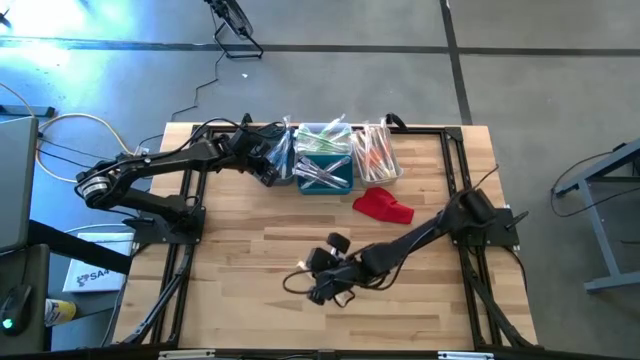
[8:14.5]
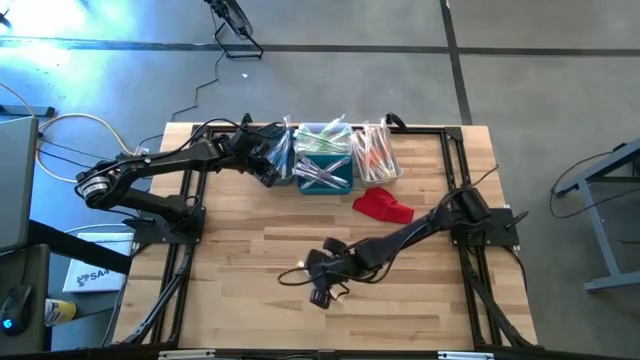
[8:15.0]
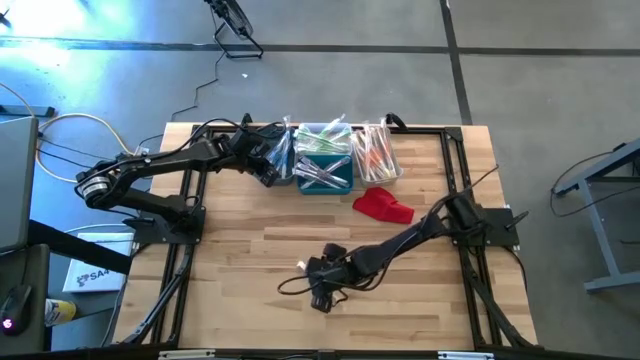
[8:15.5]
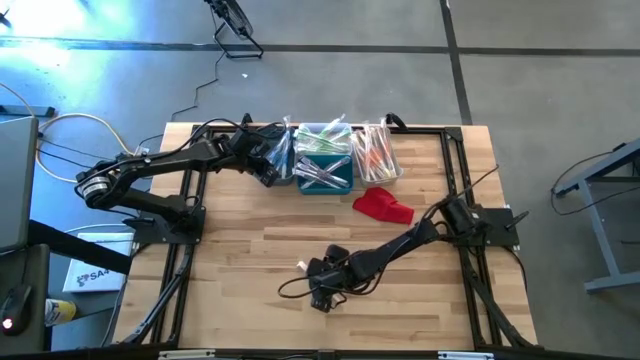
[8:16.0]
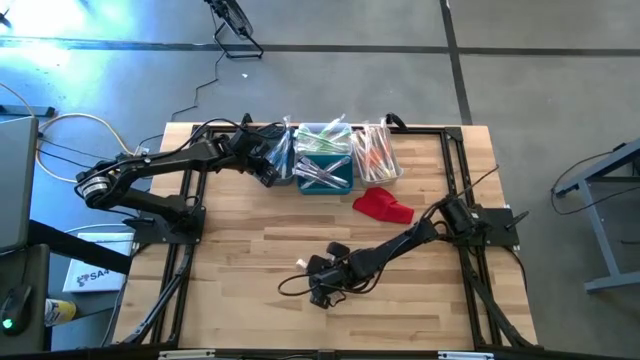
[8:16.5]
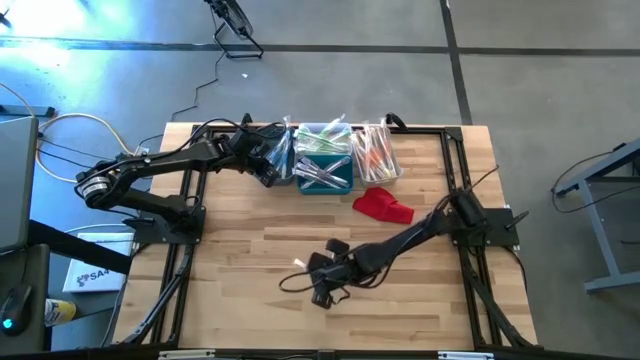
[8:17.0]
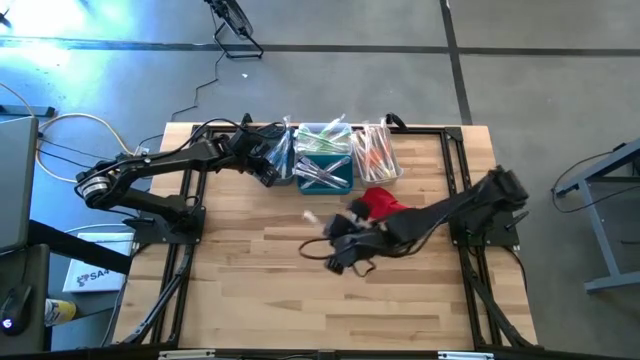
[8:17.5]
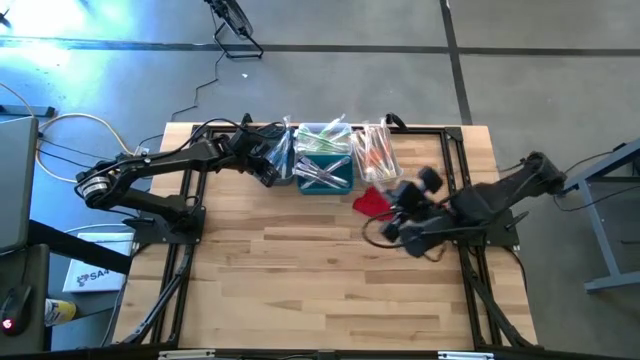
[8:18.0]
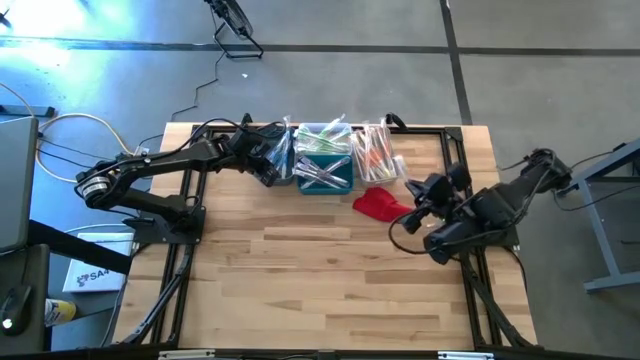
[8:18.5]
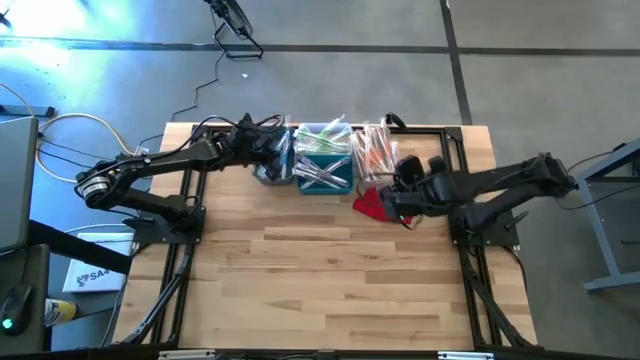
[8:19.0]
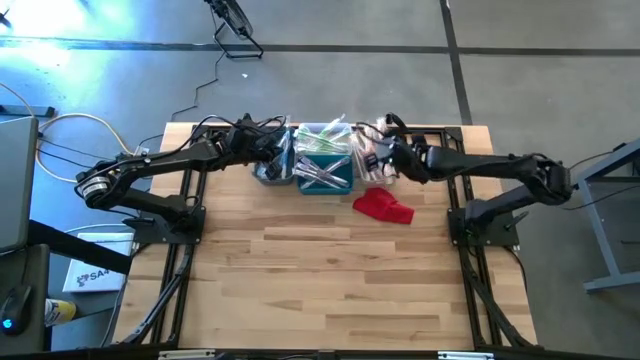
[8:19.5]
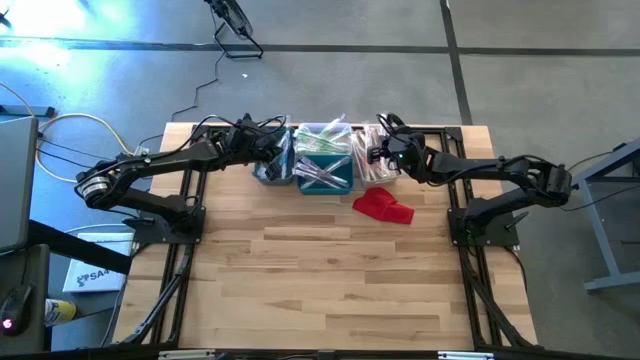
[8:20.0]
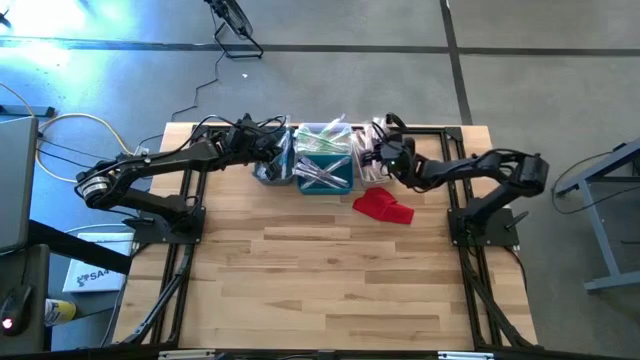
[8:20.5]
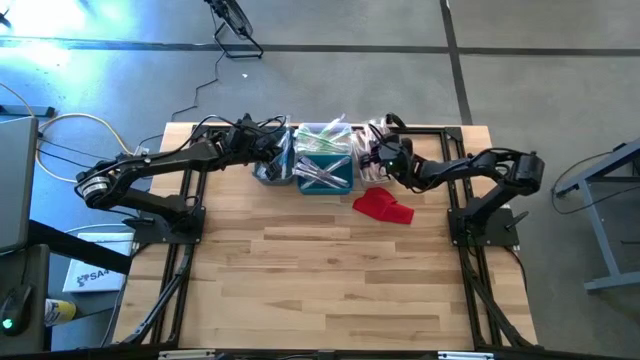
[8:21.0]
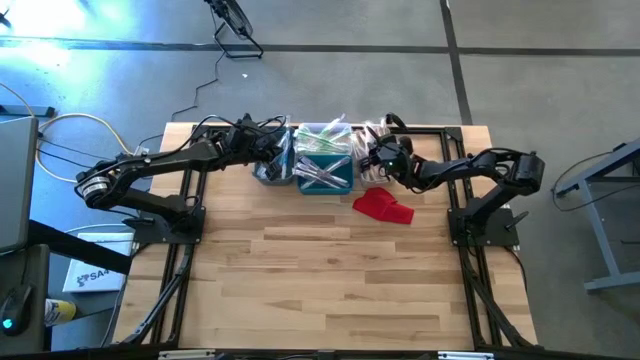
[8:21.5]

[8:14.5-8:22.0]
Task: Pick & Place Toothbrushes
Put the orange toothbrush into the white bin

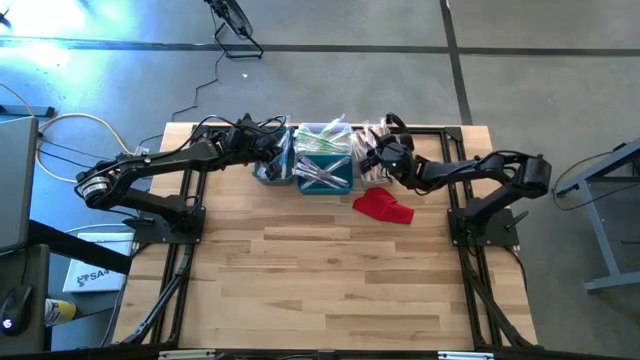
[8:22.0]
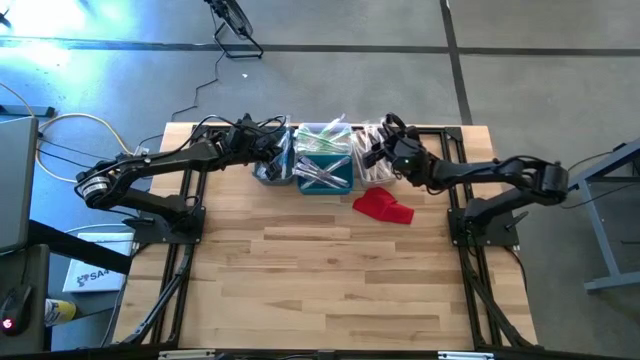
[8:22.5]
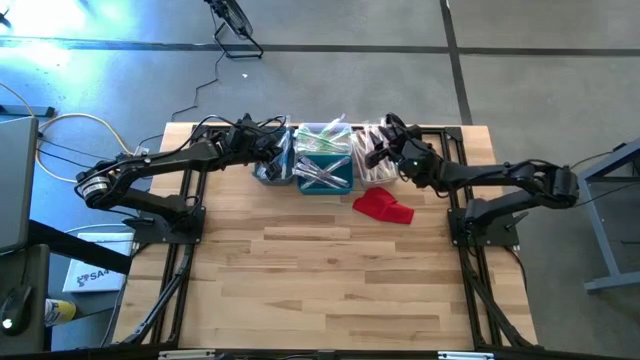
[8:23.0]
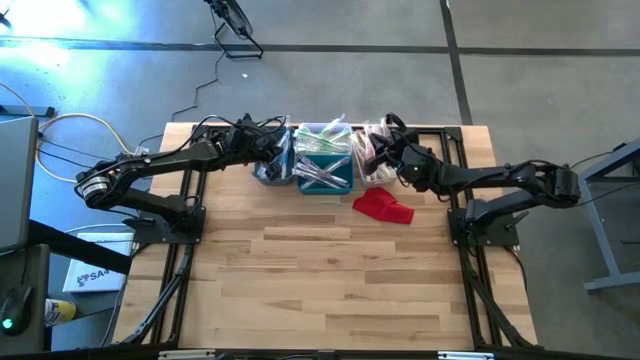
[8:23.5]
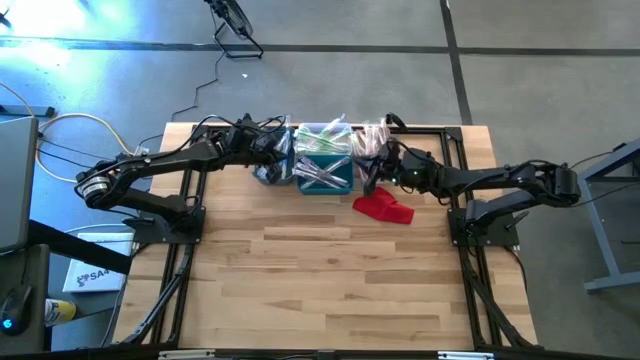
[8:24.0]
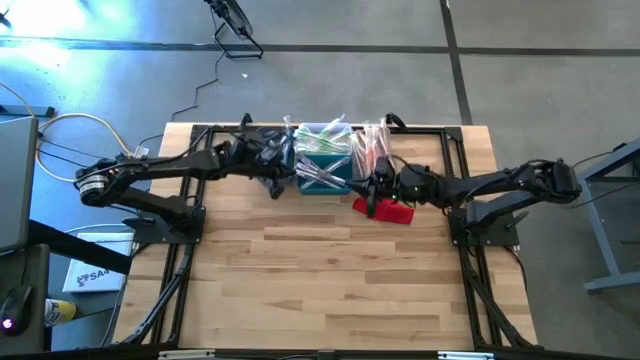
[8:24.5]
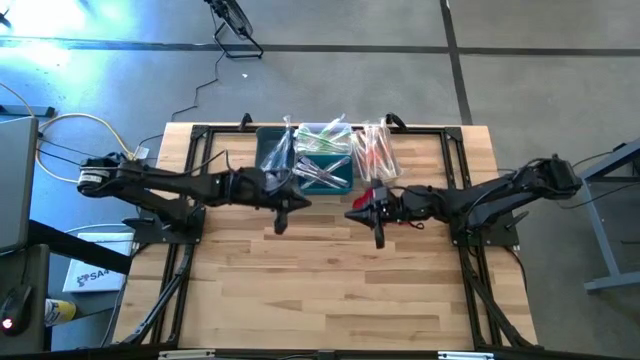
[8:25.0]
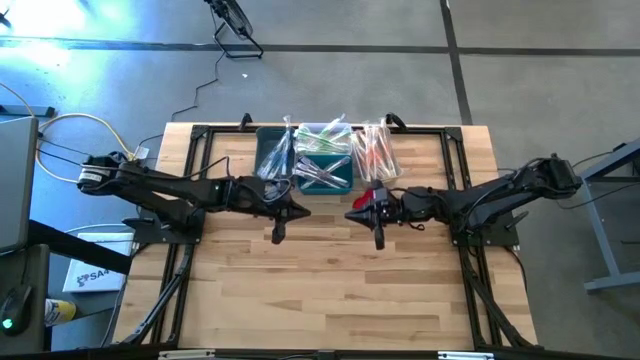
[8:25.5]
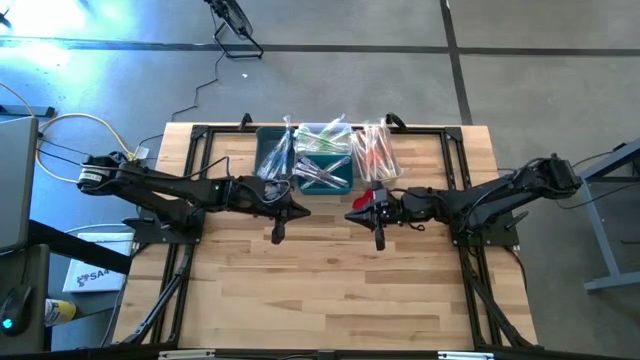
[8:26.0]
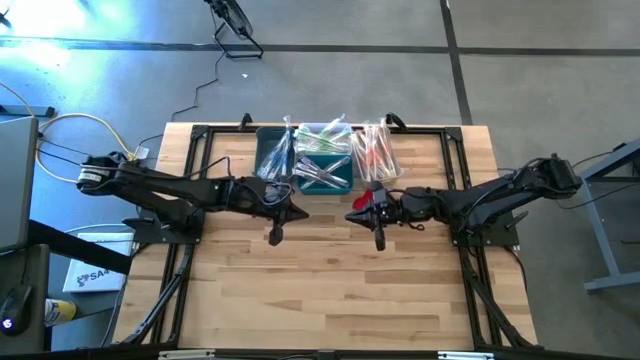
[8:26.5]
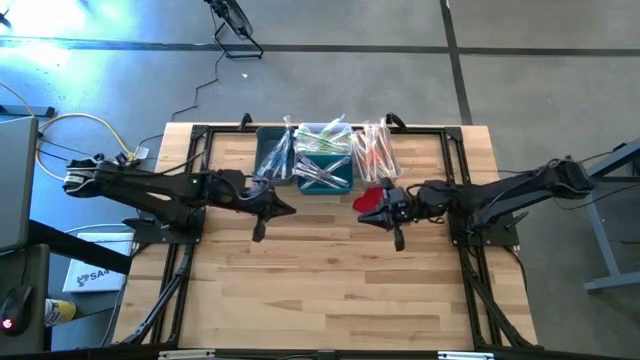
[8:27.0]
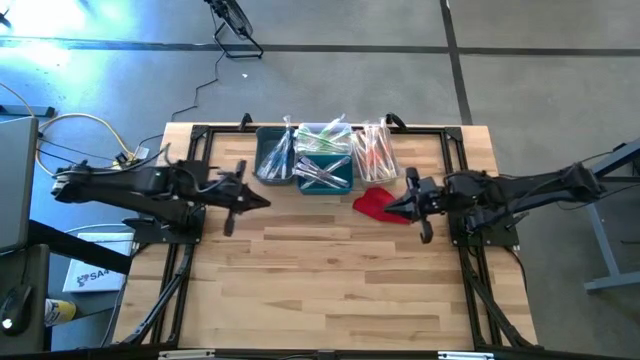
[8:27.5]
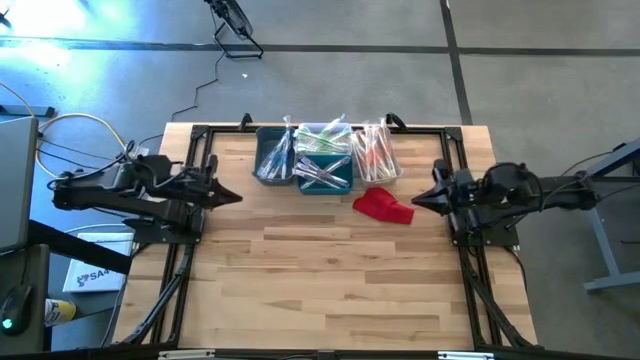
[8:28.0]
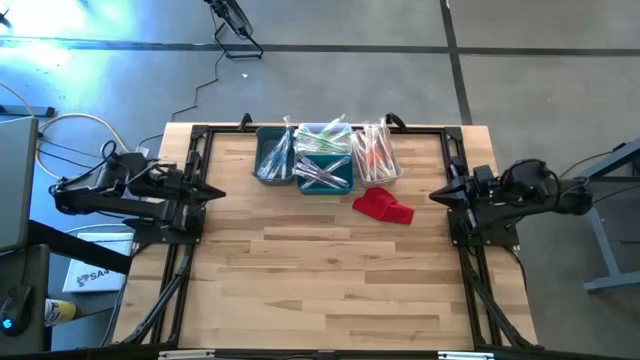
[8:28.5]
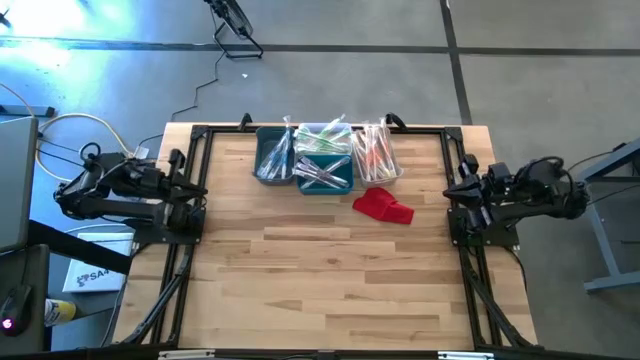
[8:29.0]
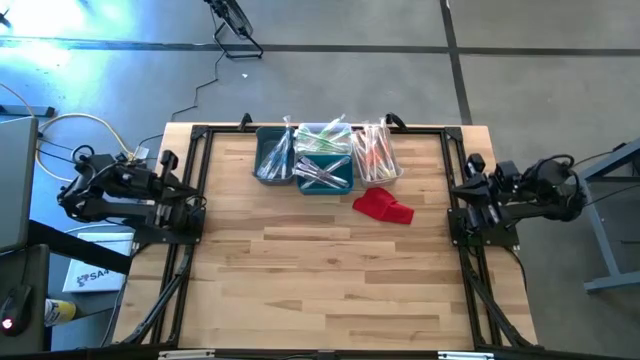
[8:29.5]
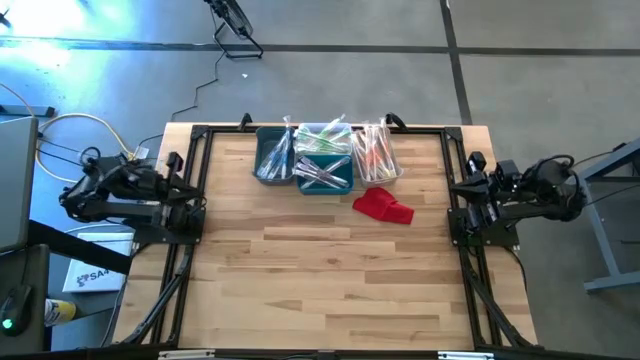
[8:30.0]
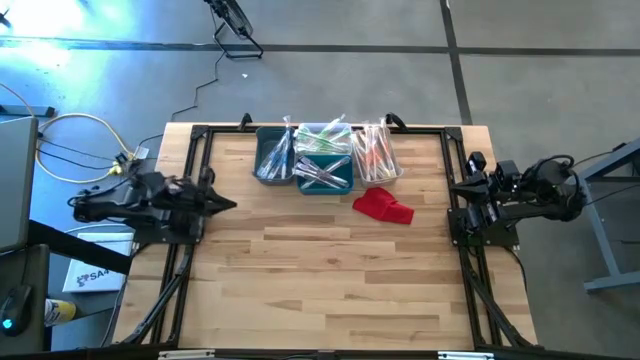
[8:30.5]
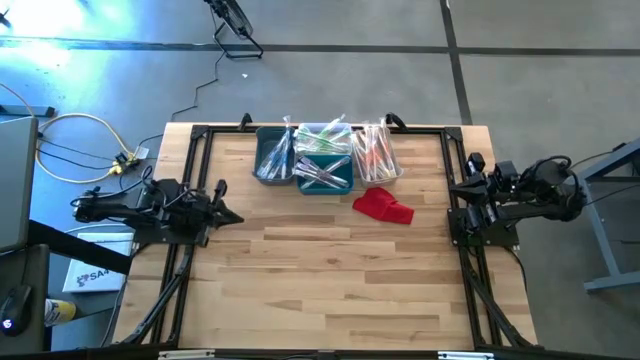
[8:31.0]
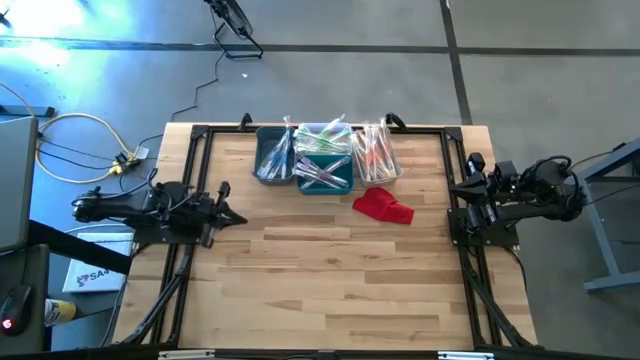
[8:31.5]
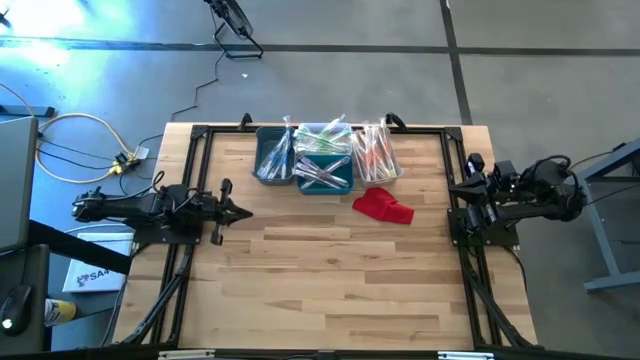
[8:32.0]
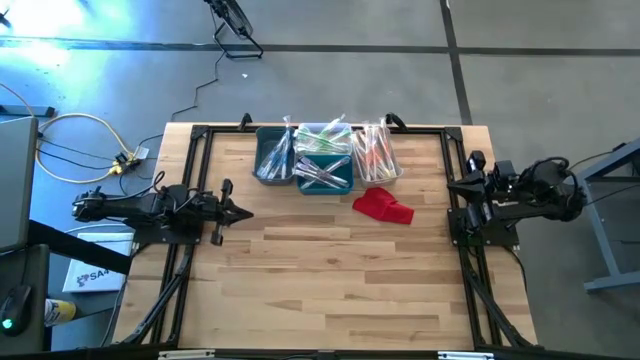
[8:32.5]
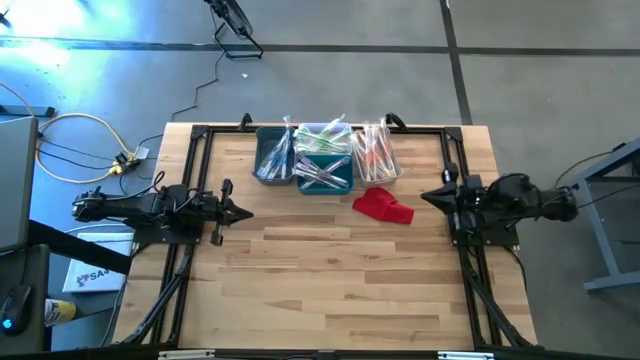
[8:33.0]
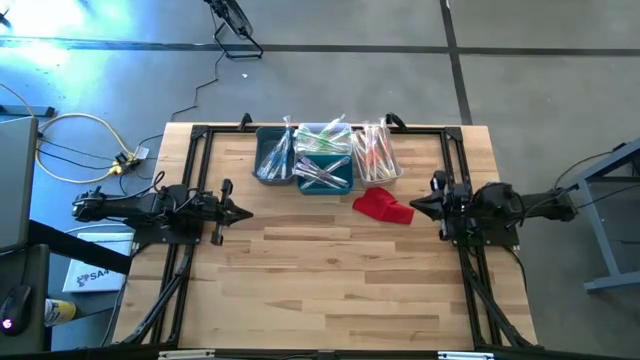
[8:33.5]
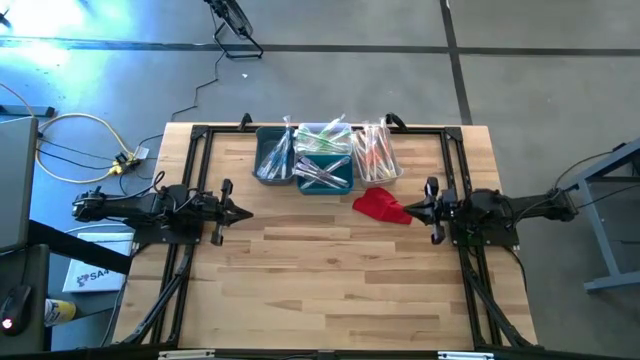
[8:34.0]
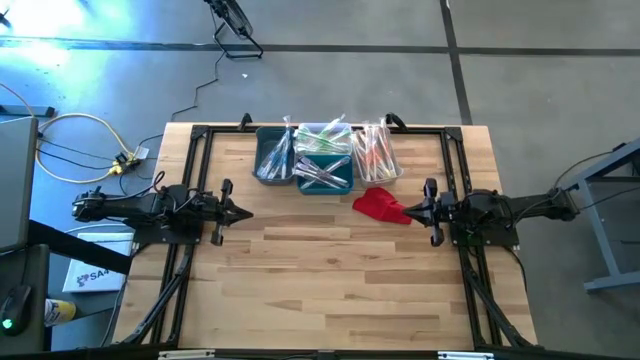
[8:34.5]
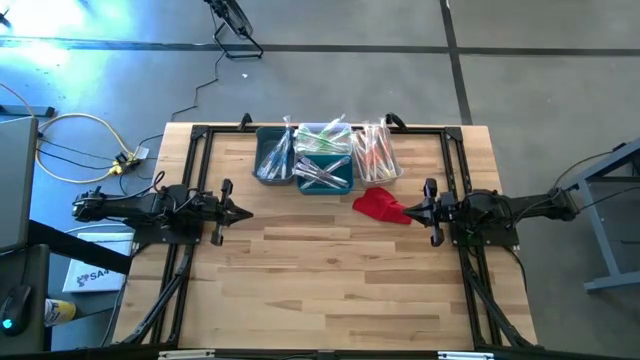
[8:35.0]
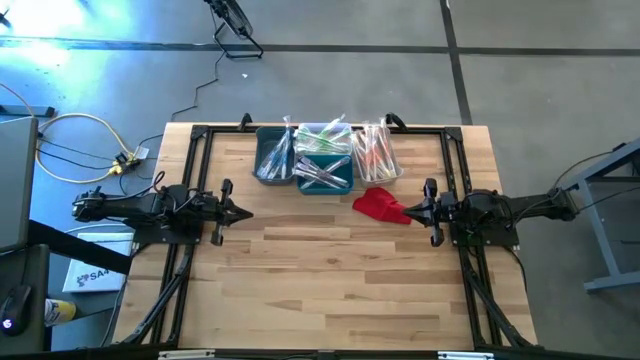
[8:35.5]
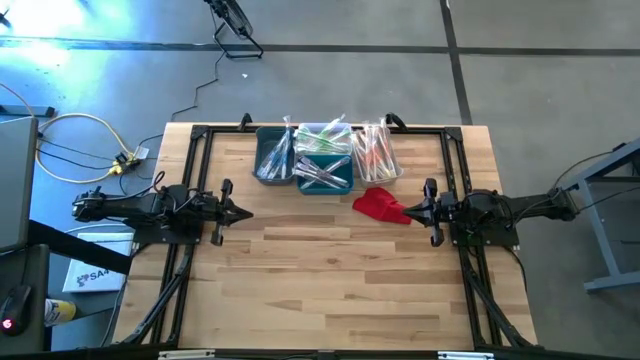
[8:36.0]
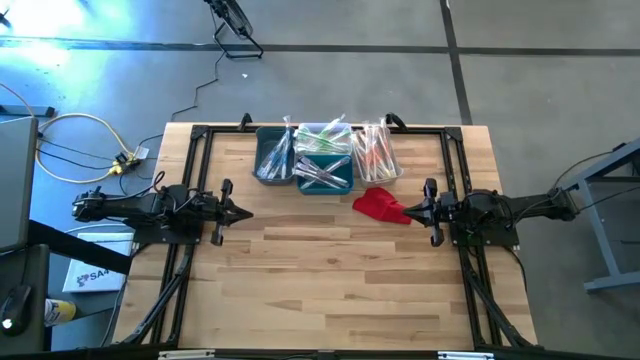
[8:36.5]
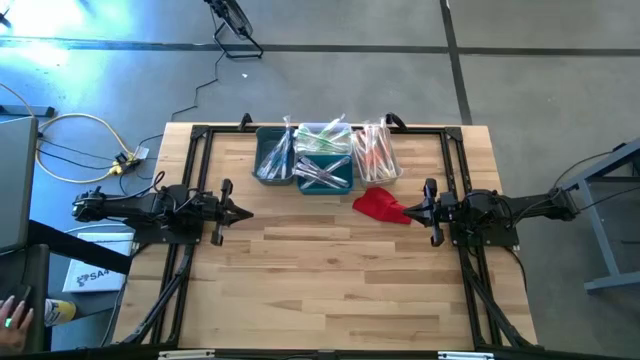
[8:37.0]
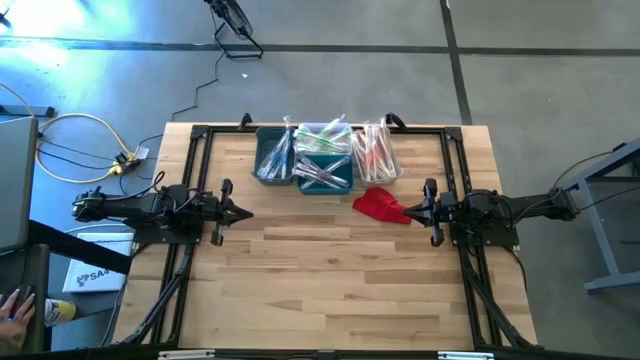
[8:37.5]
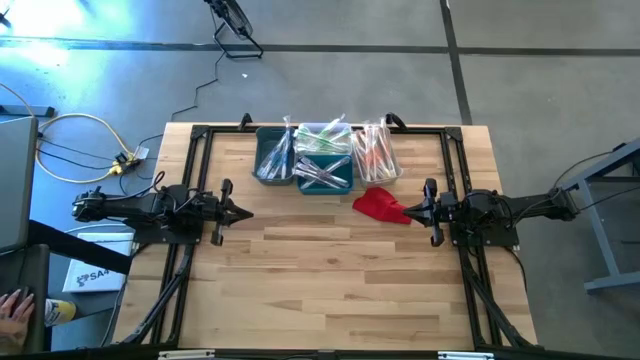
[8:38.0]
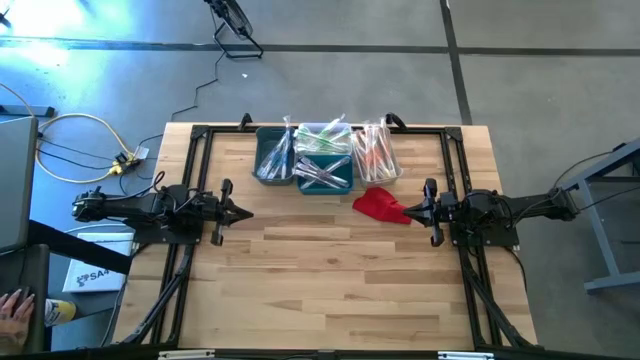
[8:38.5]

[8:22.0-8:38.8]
Return to Home Position
